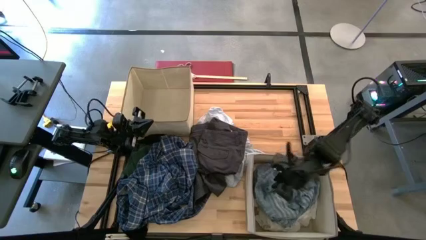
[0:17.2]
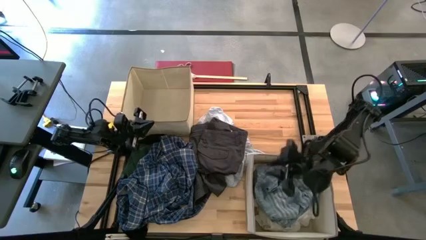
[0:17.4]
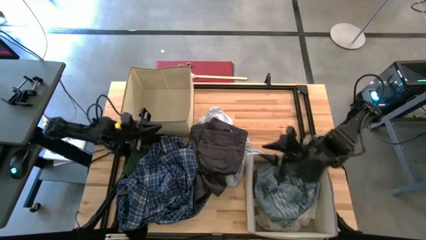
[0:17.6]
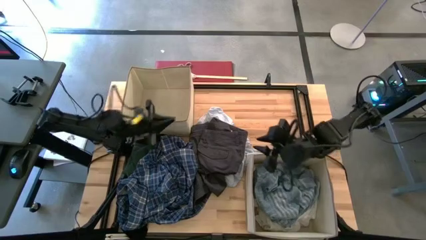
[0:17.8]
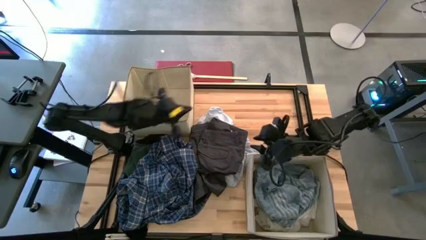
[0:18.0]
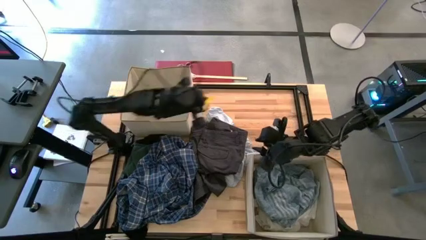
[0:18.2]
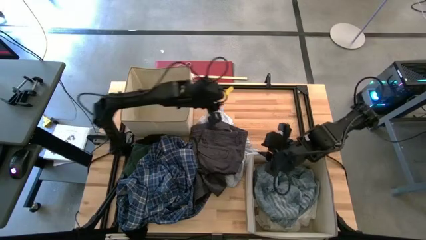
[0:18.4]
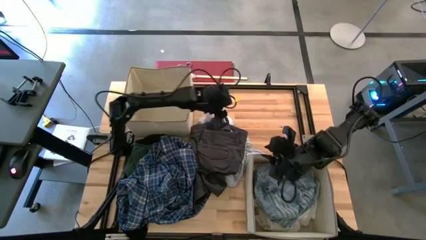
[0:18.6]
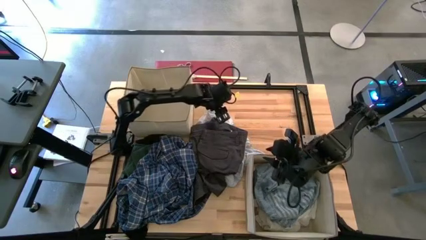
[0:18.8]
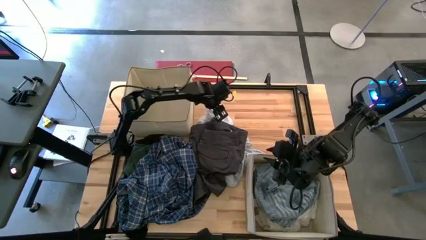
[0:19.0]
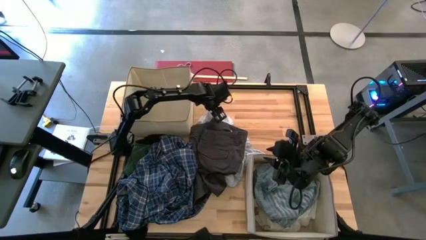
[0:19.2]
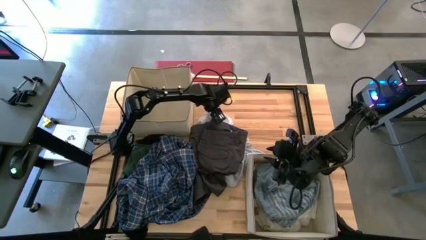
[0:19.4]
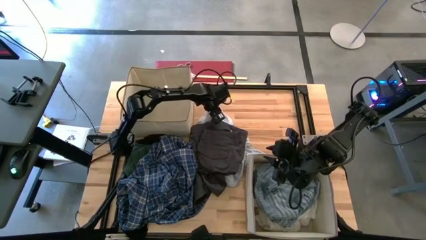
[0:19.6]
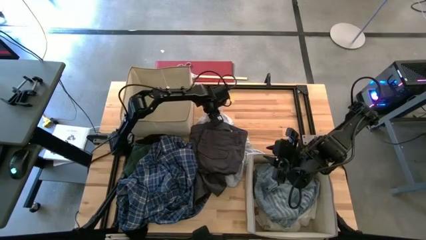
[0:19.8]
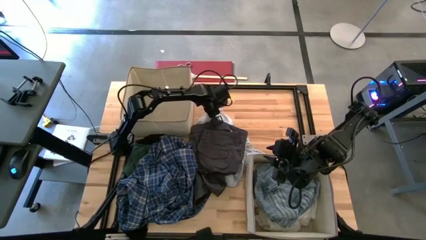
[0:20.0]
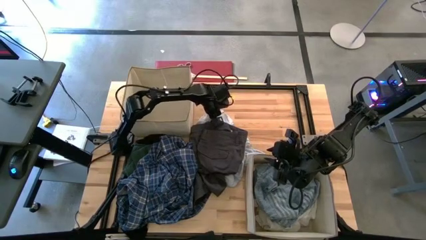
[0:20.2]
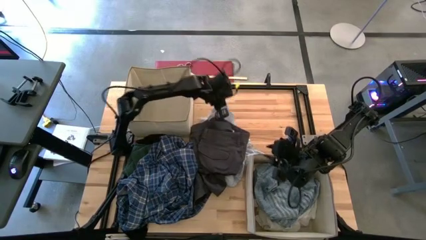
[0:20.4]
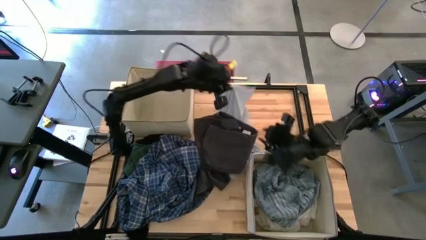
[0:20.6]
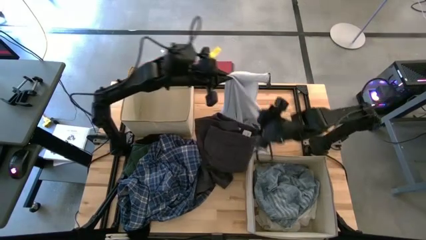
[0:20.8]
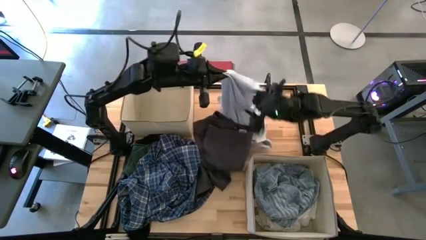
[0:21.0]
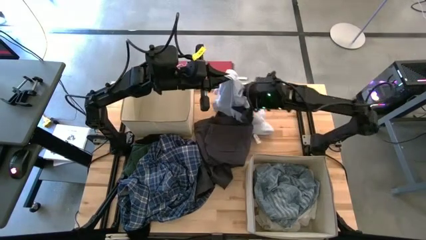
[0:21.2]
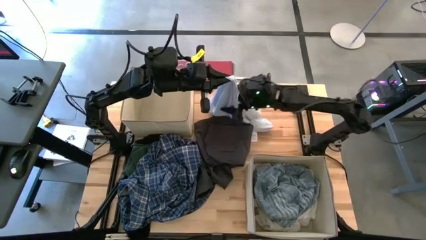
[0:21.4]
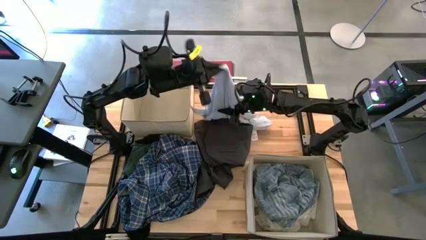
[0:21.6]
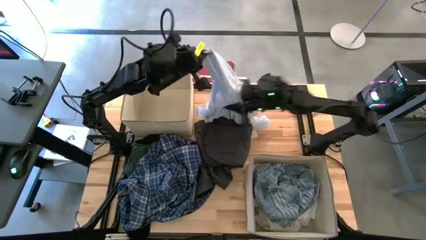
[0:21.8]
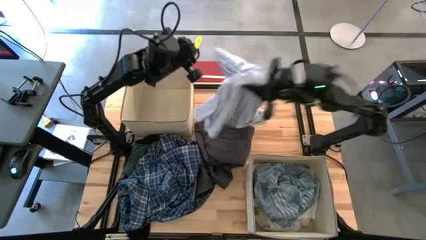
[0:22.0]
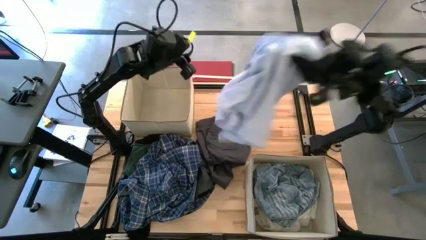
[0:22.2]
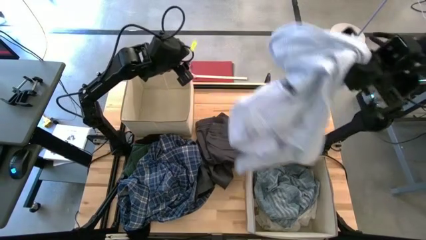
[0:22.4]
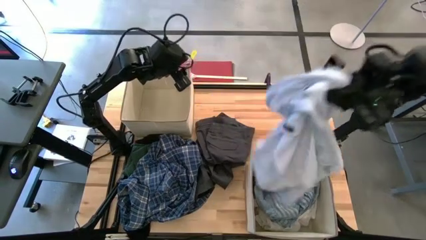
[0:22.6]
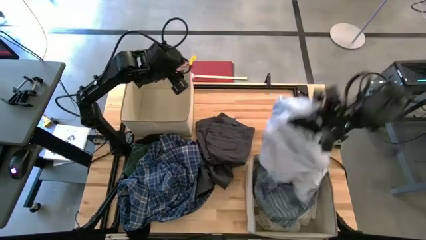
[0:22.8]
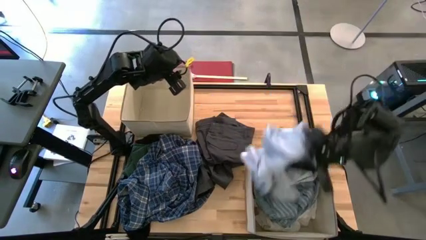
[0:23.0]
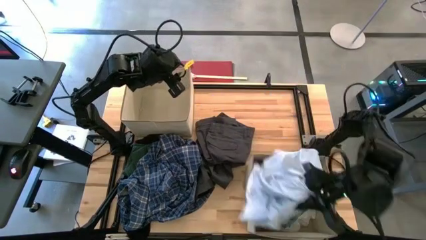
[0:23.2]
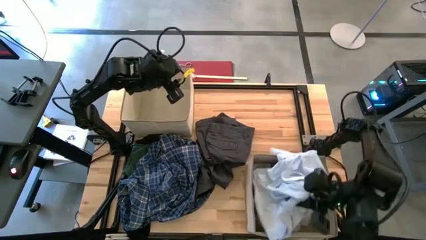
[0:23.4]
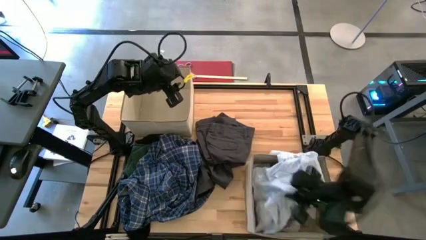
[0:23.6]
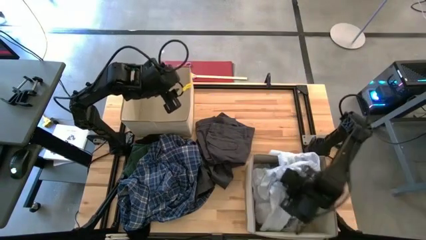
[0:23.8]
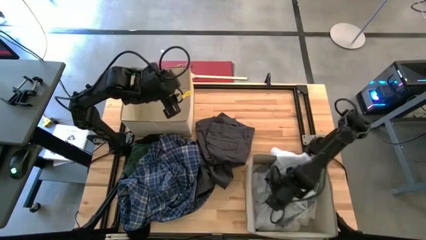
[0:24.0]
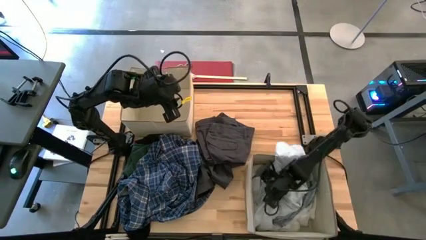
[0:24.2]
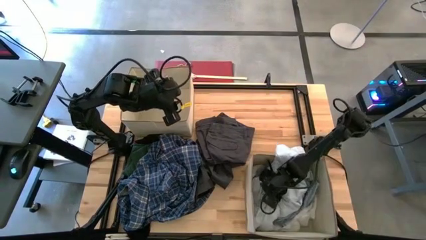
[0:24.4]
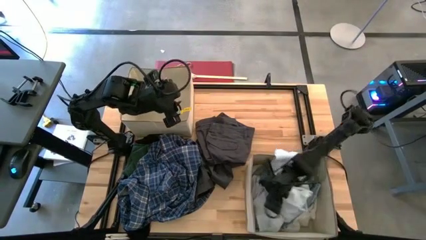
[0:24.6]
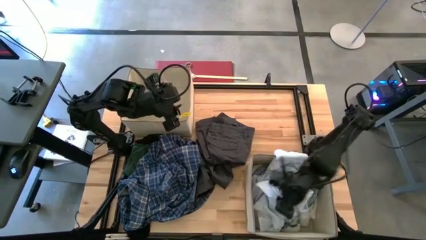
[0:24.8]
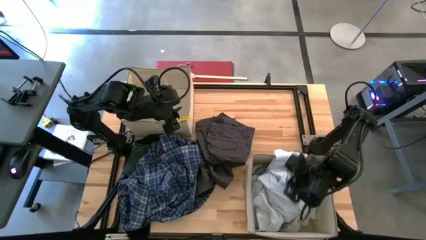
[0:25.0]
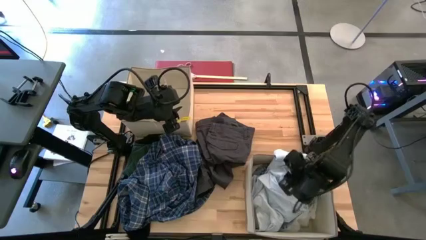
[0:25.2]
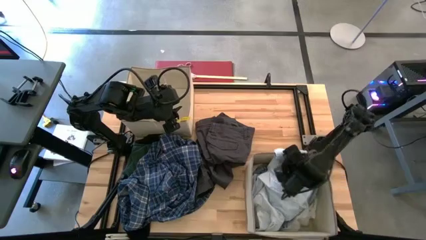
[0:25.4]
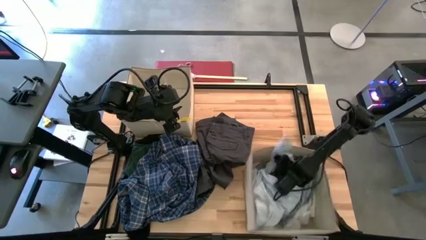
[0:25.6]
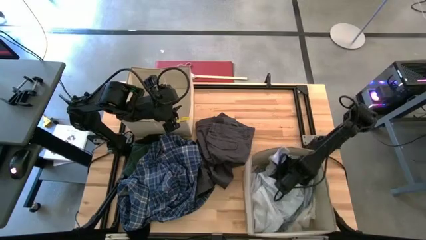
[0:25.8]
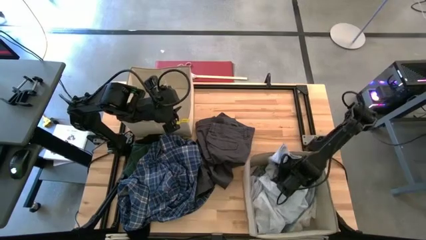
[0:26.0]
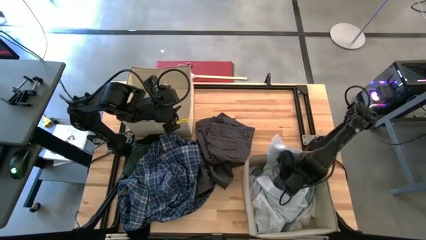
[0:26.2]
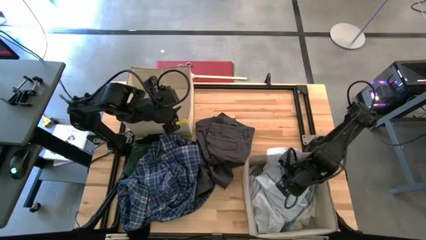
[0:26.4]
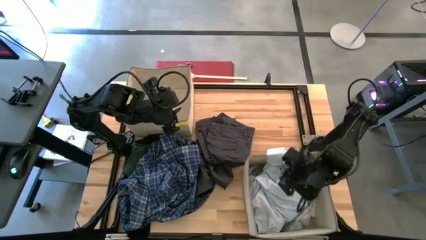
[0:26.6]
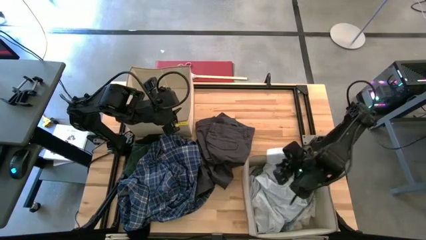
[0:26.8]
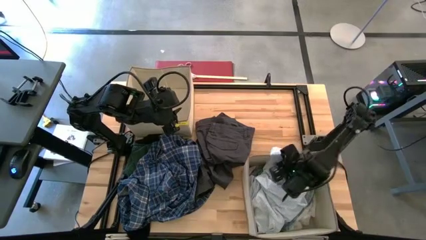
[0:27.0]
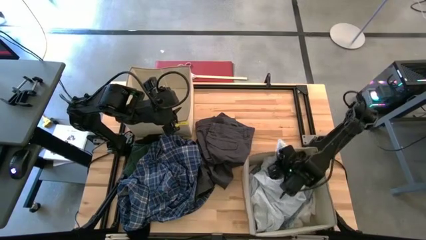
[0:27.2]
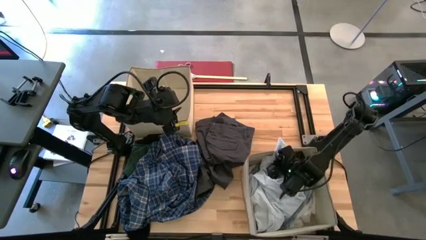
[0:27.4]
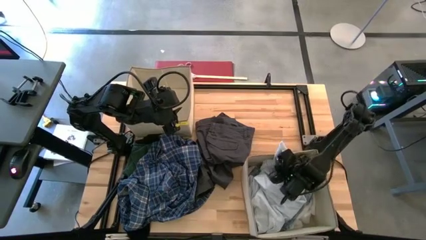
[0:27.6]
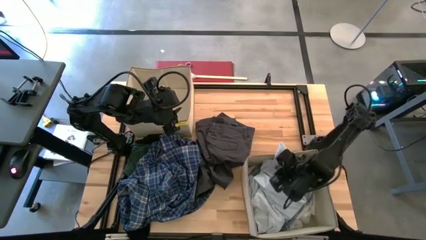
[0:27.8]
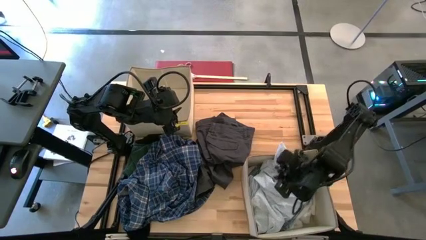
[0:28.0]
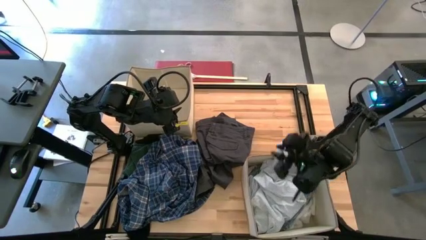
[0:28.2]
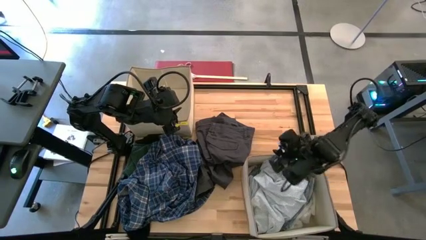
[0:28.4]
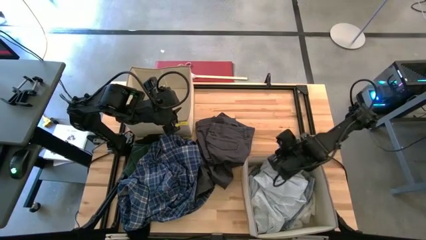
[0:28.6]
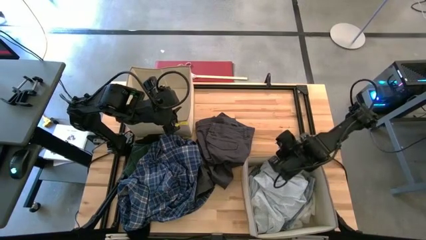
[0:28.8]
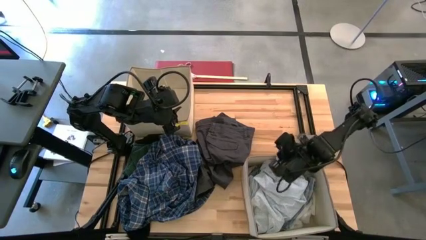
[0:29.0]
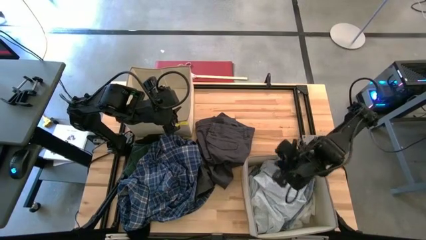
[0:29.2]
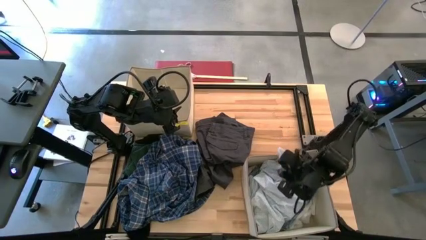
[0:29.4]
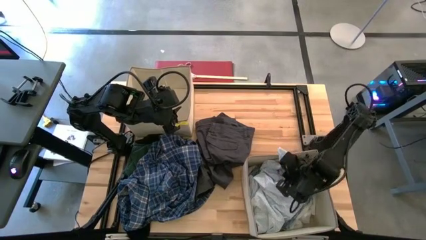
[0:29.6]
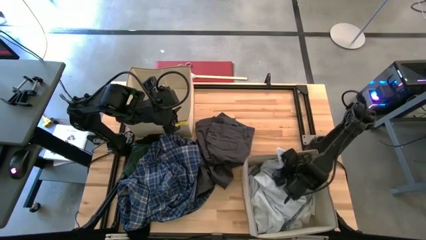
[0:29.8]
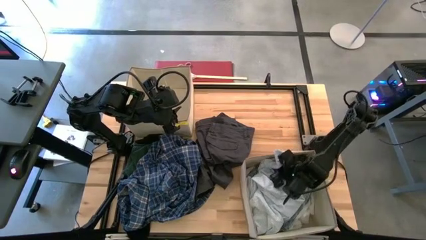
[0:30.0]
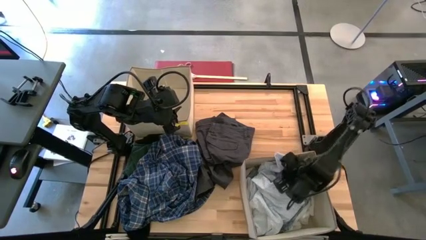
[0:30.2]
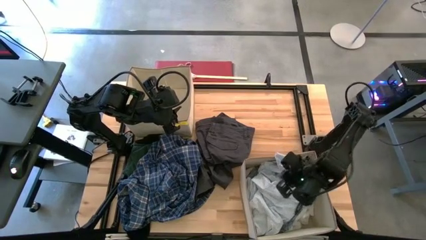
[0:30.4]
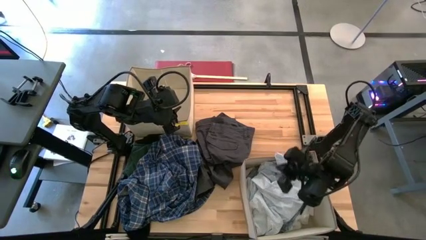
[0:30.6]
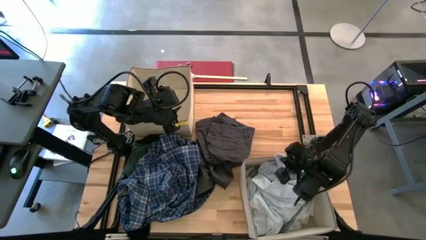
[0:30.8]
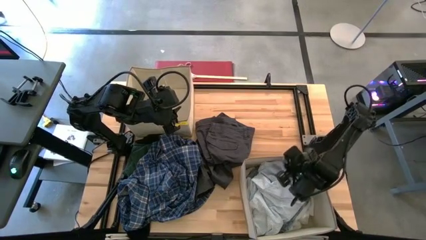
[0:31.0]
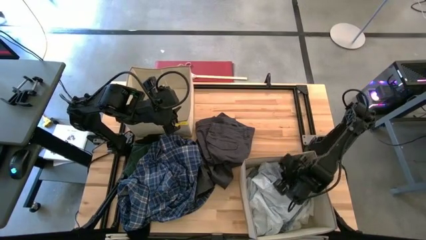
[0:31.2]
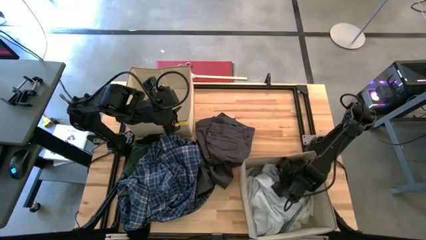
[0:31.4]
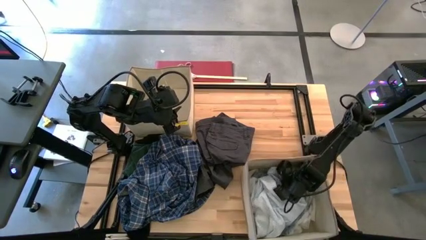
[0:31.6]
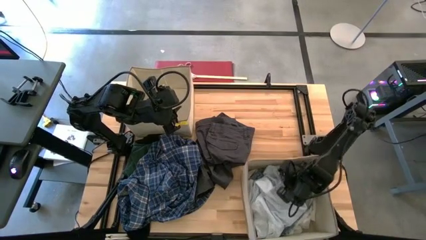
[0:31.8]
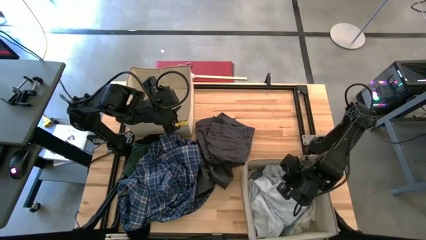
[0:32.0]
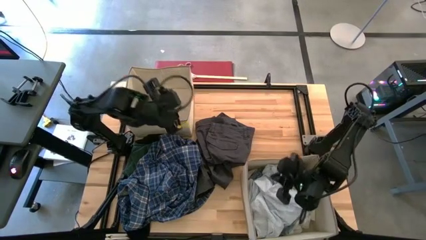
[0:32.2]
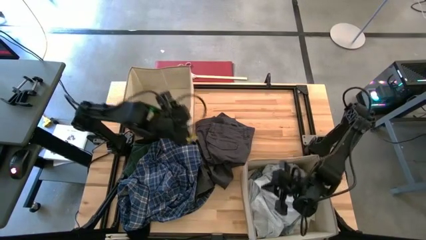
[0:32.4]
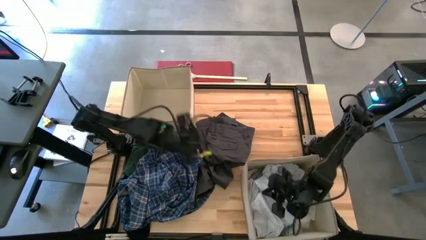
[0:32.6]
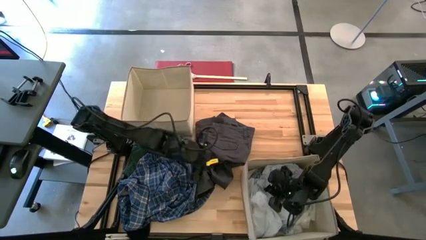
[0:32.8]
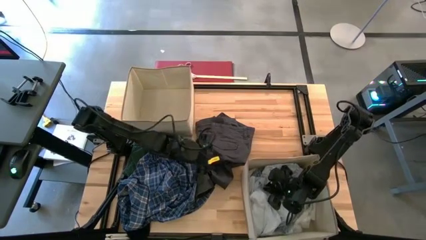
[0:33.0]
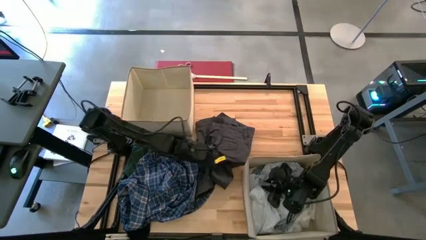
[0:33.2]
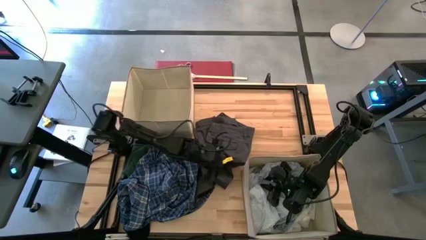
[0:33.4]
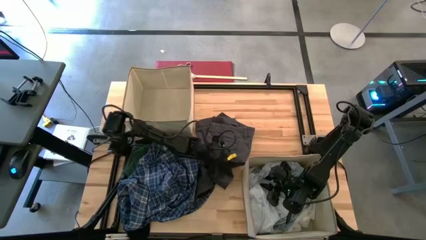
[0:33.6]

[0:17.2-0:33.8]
Task: Sort clothes
Put the white pattern shirt into the bottom laundry bin
